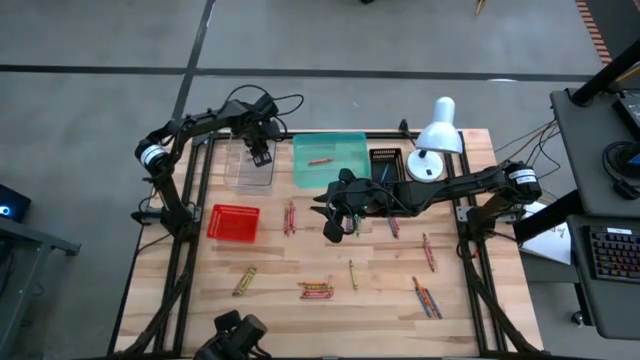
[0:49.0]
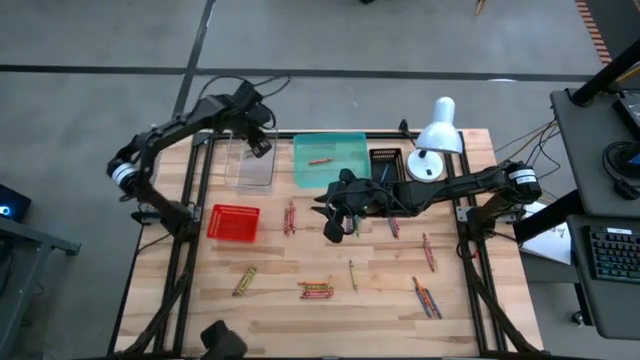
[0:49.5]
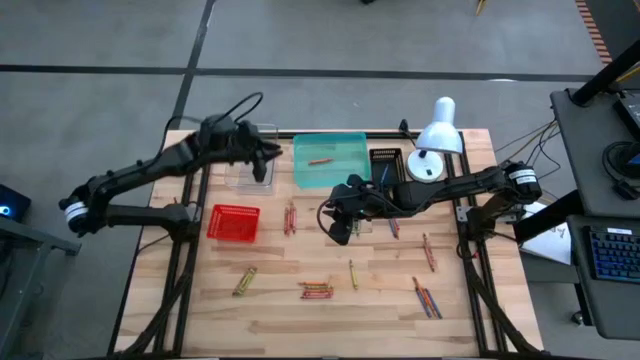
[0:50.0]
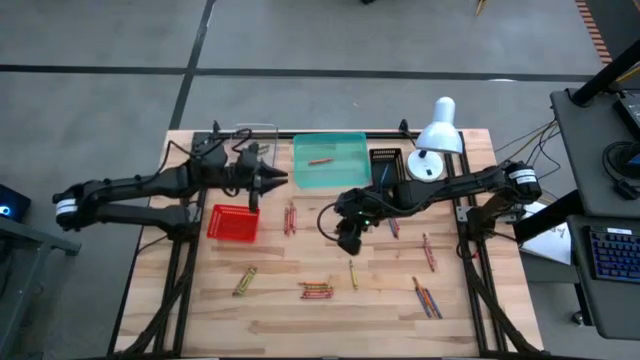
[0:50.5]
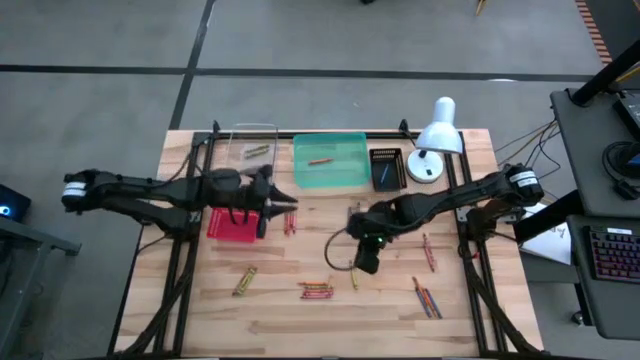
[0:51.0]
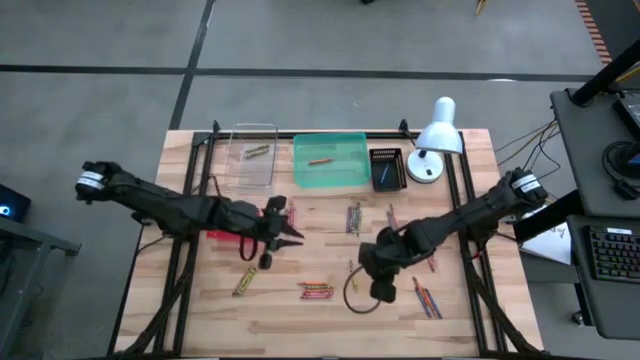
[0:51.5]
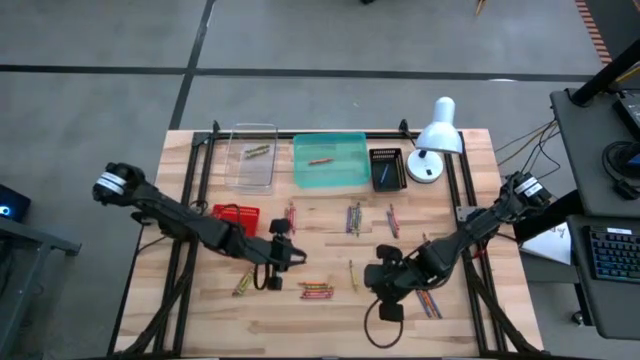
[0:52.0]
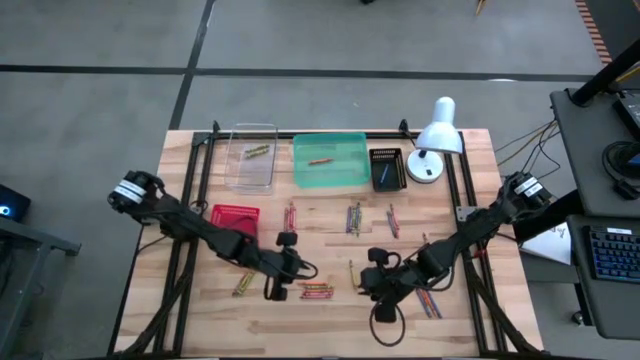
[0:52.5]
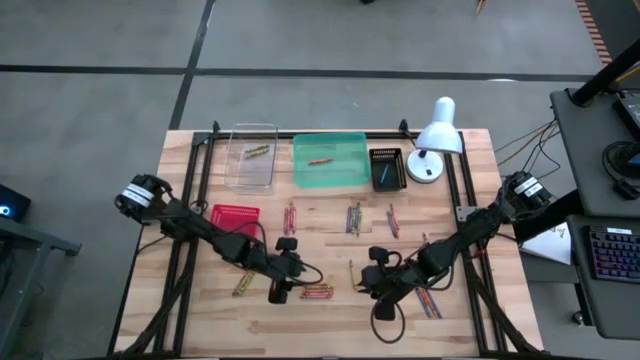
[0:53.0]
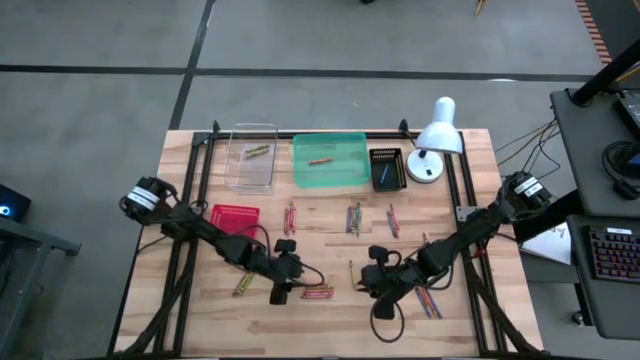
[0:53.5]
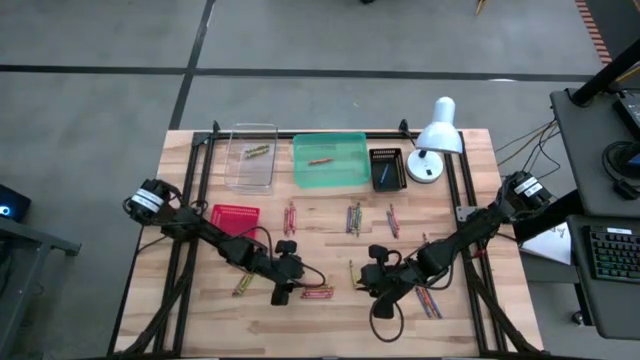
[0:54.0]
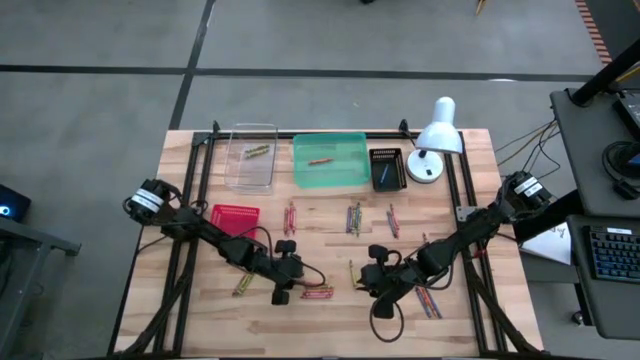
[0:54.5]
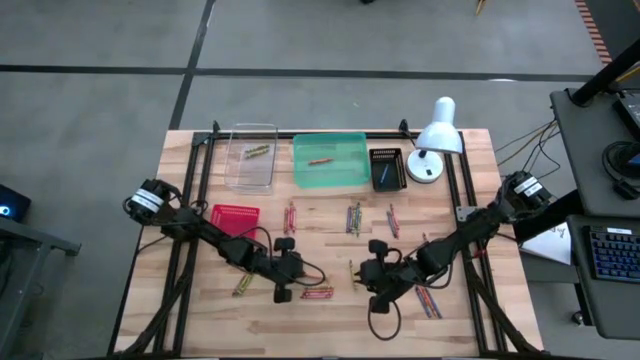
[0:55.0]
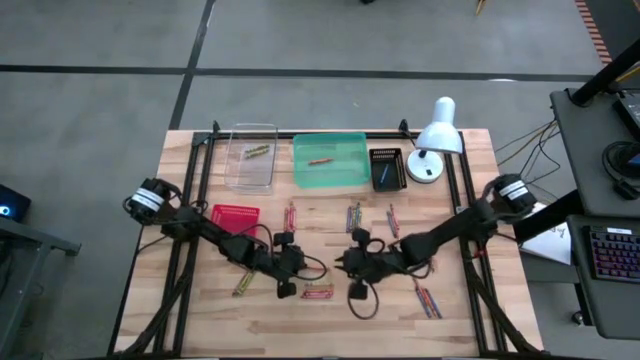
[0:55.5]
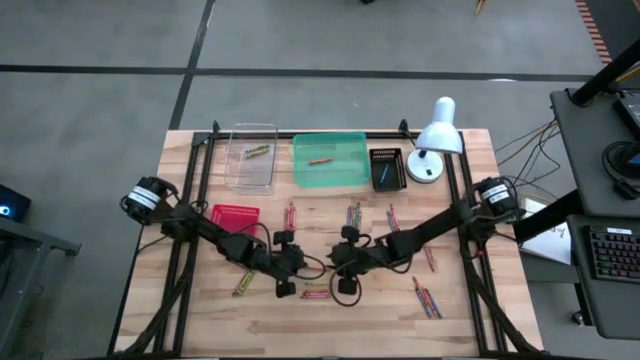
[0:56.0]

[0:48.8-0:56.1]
Task: Sort crayons
Put the orange crayon into the green bin

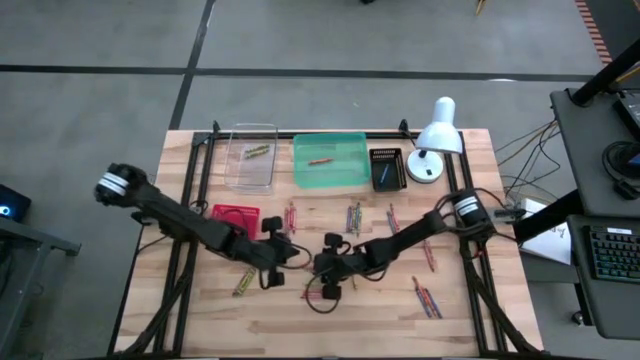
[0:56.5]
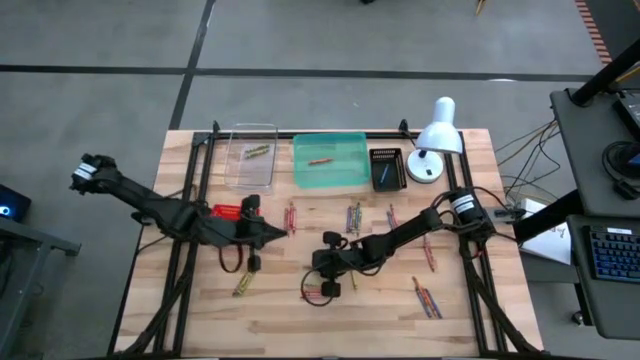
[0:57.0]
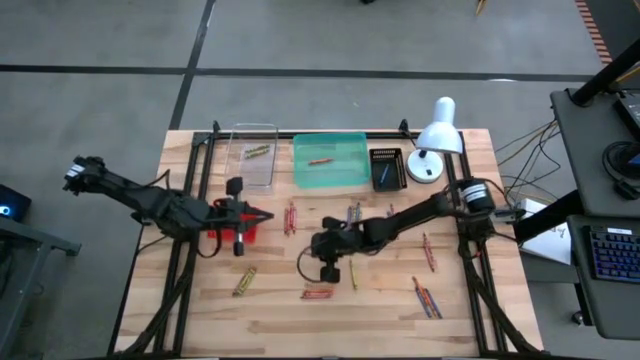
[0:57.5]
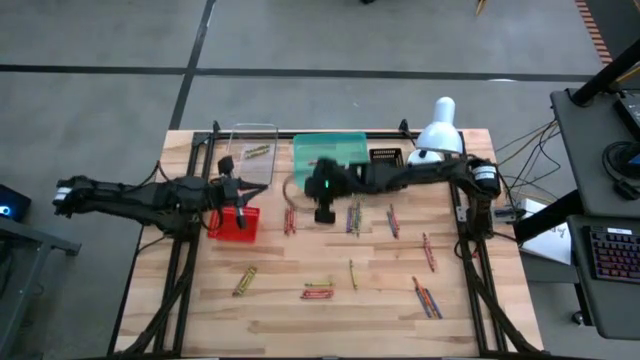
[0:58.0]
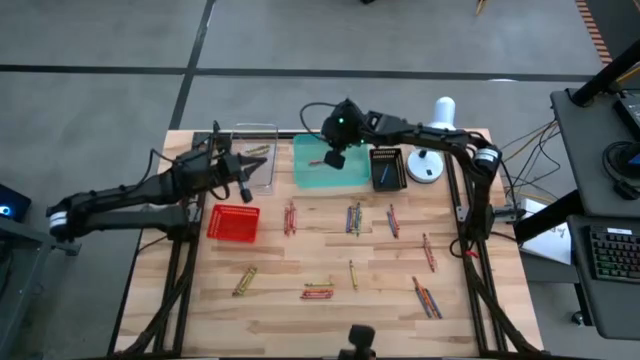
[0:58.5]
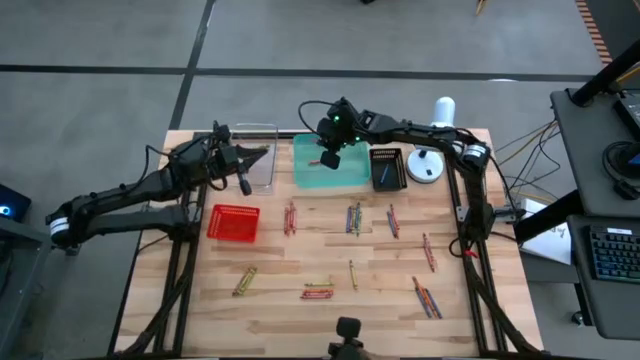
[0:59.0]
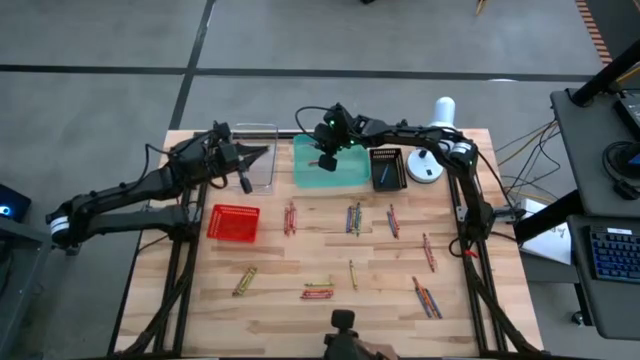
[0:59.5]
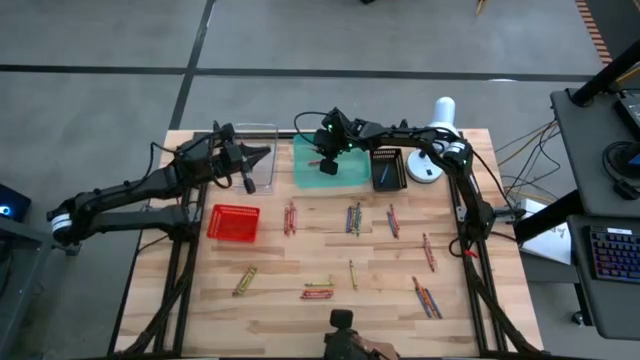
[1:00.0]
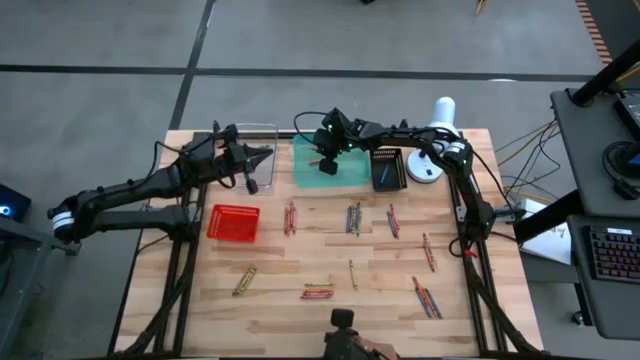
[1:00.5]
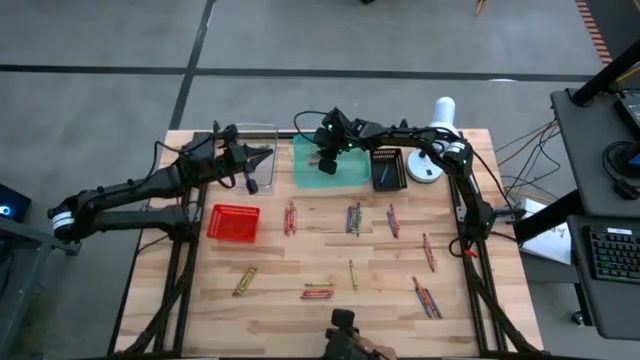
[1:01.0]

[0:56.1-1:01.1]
Put the orange crayon into the green bin

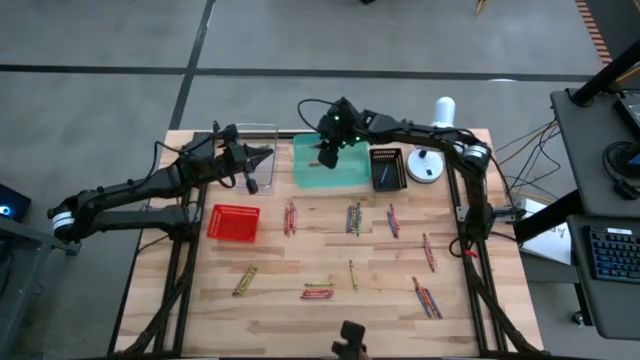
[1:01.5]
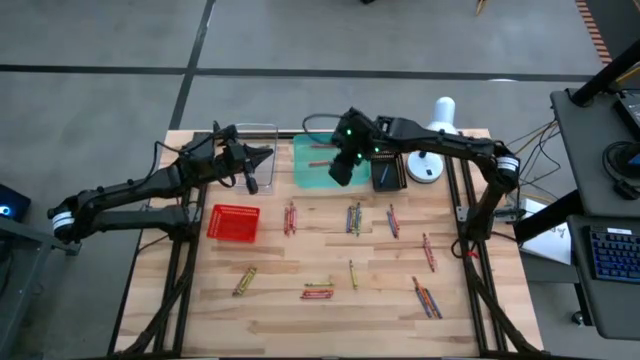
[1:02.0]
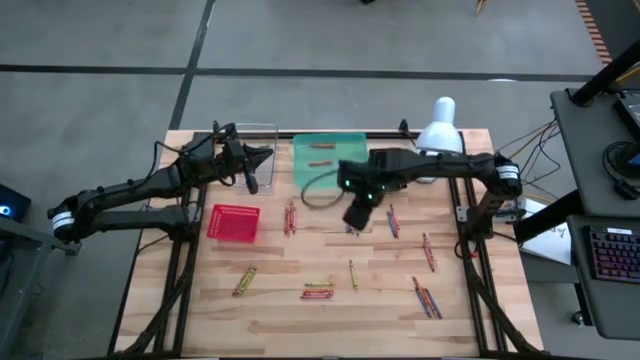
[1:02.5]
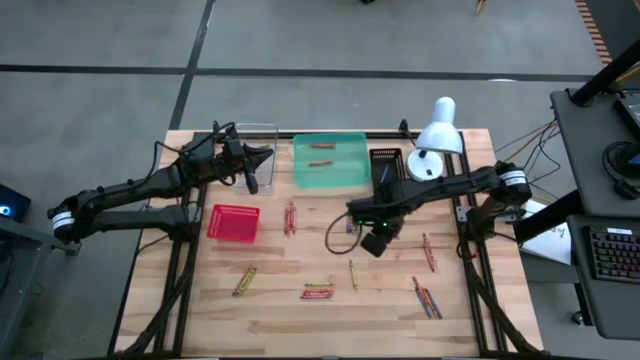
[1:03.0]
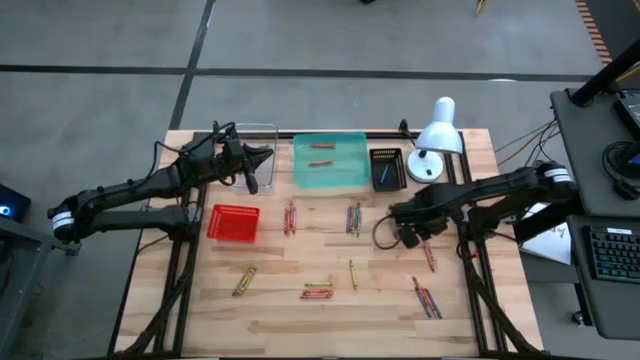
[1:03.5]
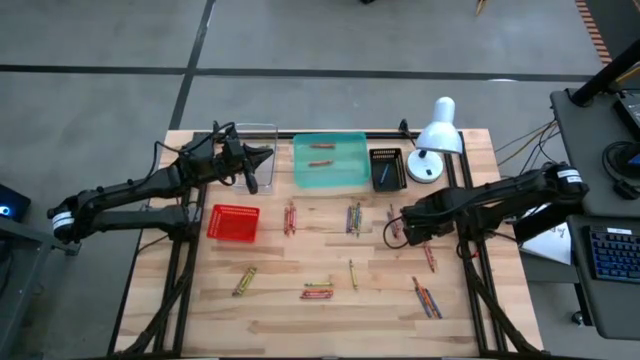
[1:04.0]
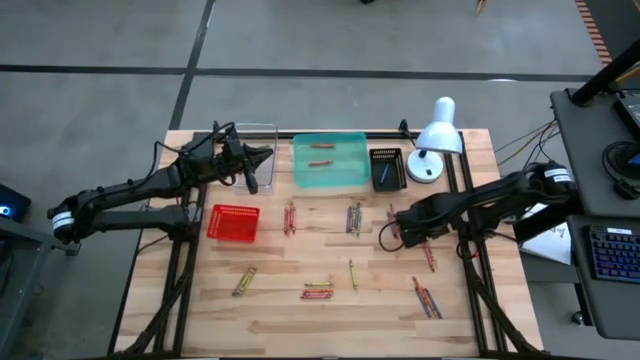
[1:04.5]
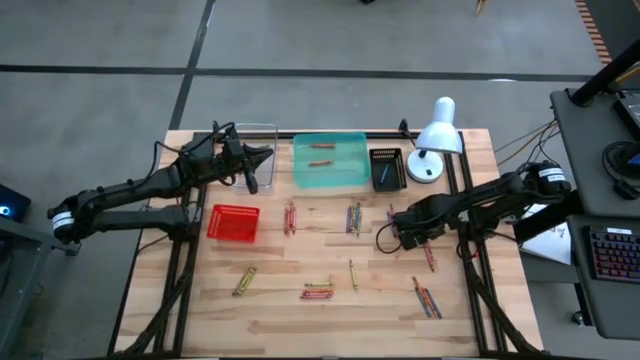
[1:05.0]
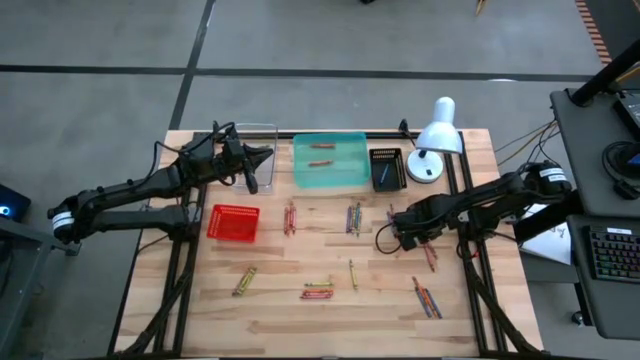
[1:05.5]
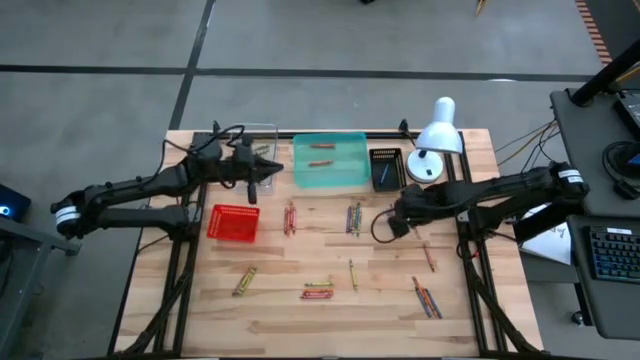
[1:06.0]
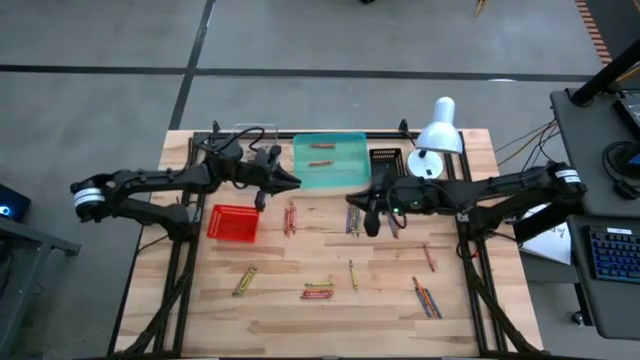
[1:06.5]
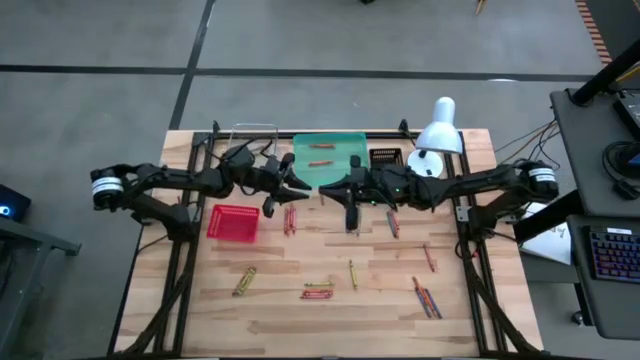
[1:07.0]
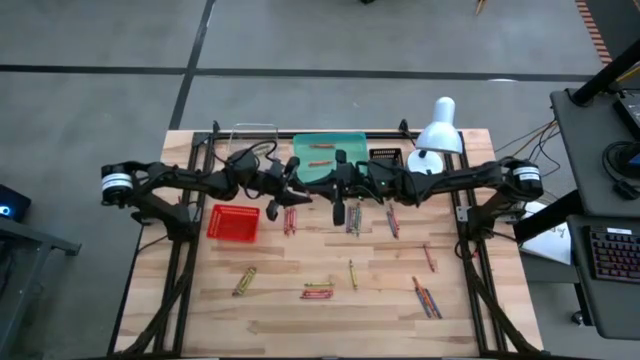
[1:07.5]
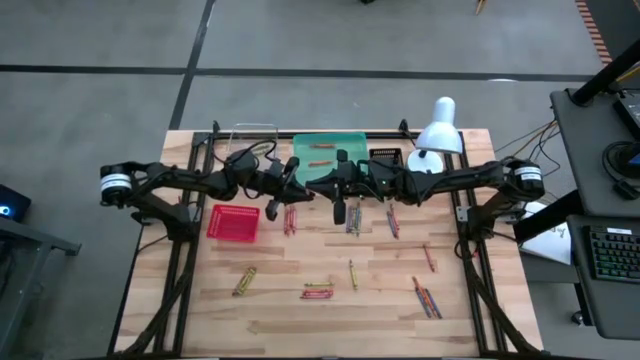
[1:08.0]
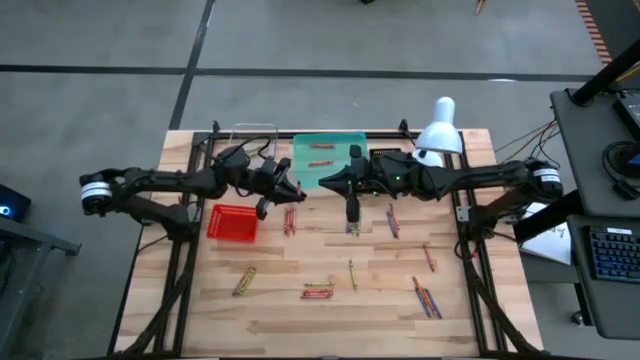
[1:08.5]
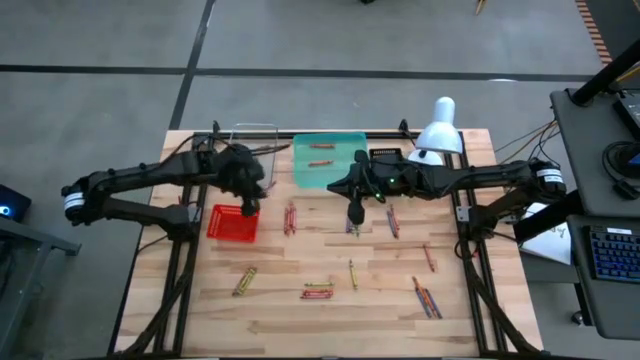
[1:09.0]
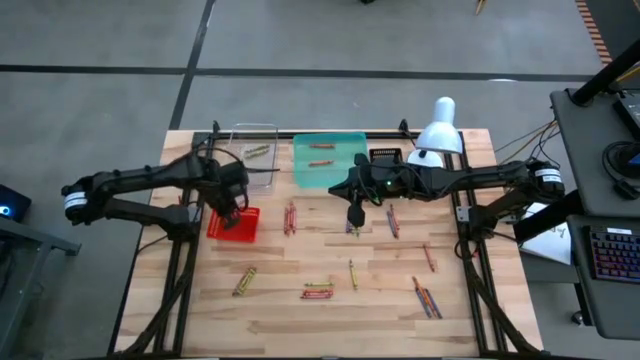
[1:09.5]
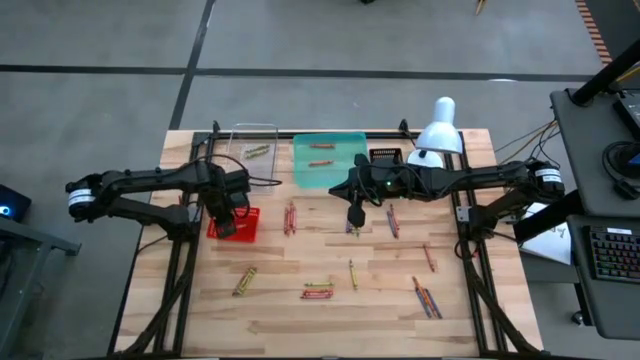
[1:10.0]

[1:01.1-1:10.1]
Put the red crayon into the red bin
